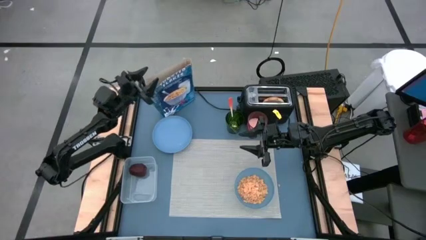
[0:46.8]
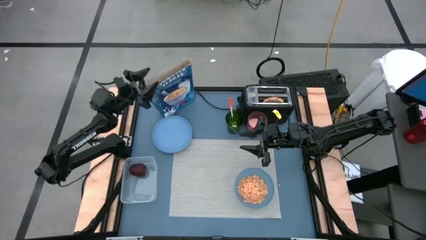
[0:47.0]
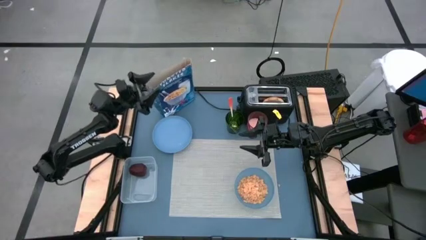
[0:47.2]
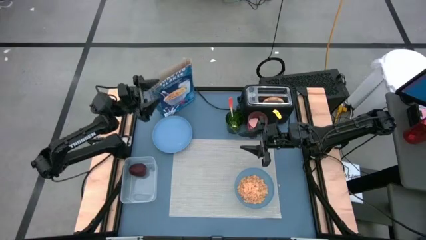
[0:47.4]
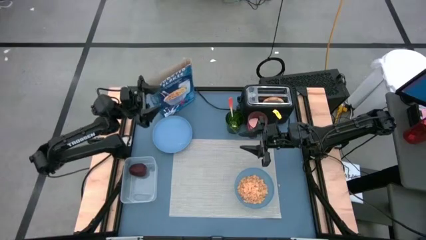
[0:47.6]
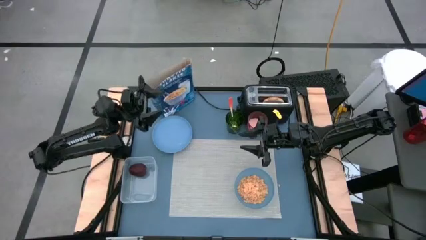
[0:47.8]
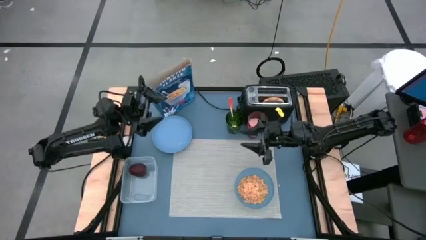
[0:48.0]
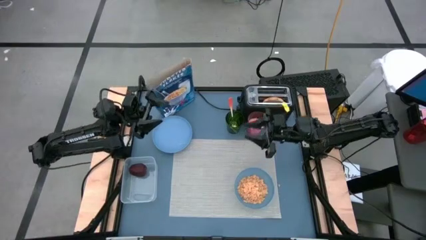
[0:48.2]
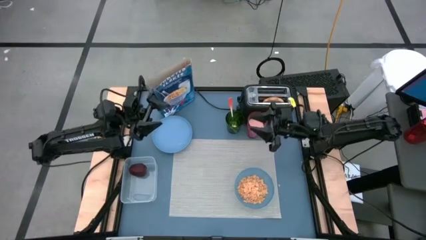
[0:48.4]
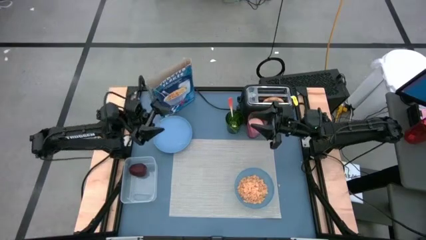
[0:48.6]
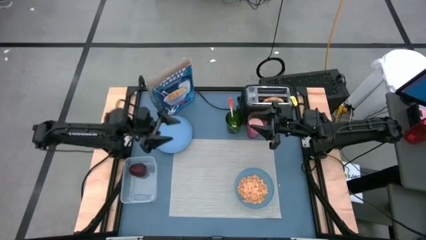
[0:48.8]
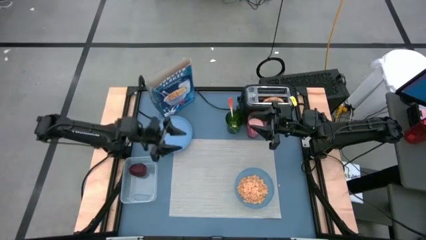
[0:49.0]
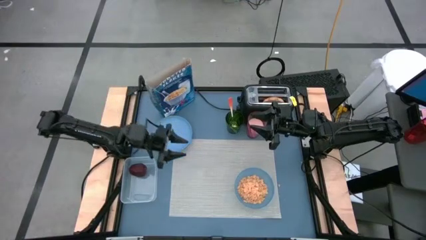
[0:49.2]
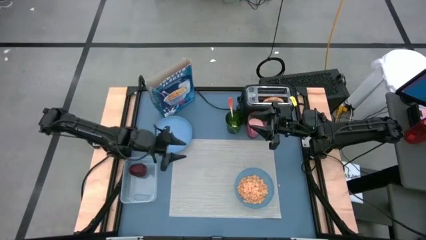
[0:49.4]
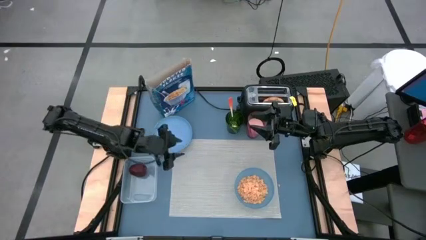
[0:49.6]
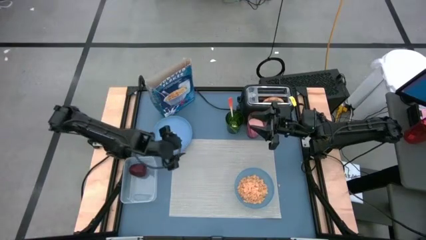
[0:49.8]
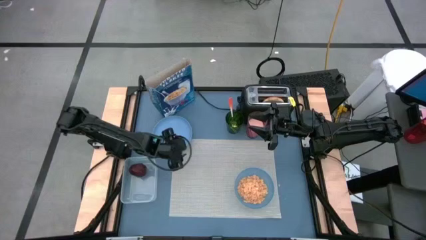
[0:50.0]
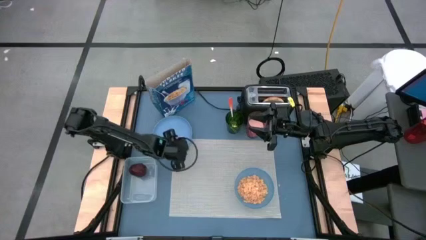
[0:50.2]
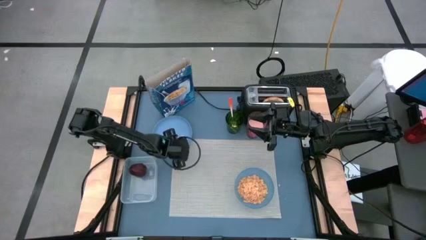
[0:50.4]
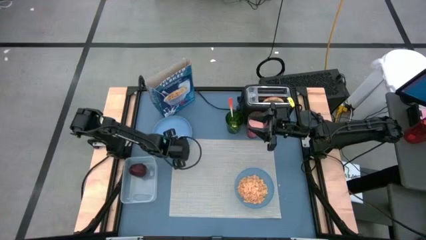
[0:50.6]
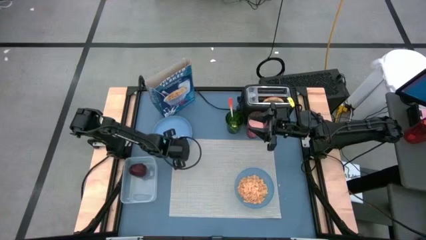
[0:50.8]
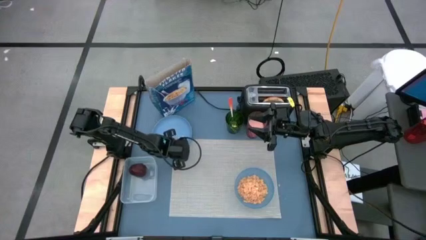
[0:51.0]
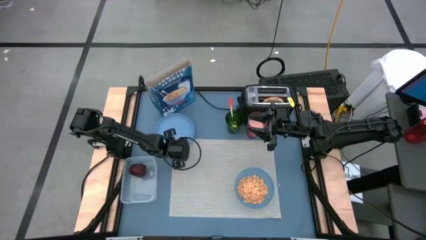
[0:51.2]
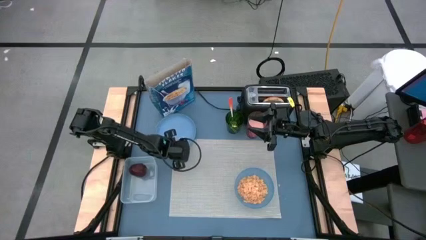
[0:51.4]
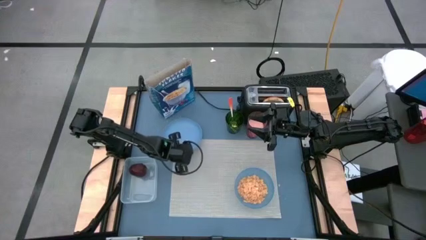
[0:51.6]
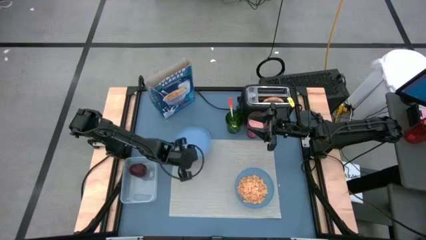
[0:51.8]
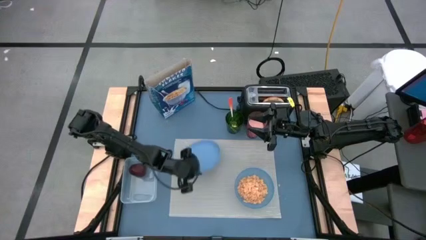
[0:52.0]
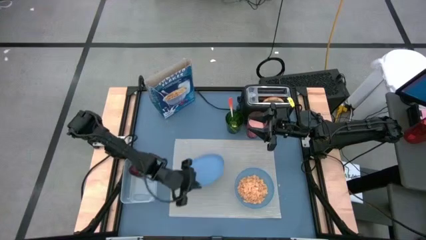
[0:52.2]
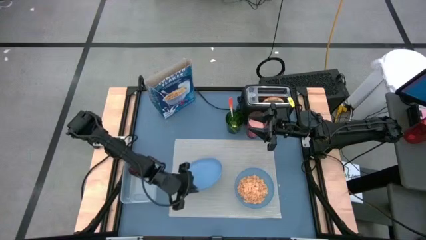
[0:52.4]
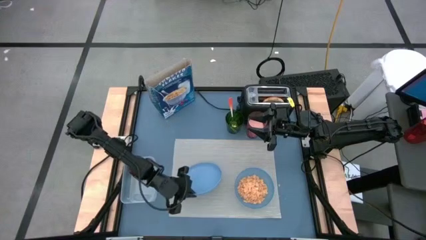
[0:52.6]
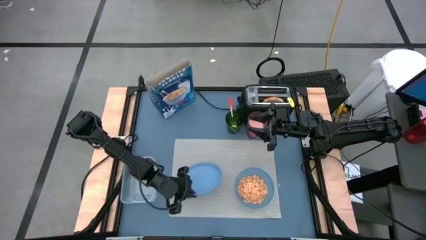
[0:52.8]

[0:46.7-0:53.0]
Task: Arrange a breakfast setting
Put the blue plate on the gray placemat

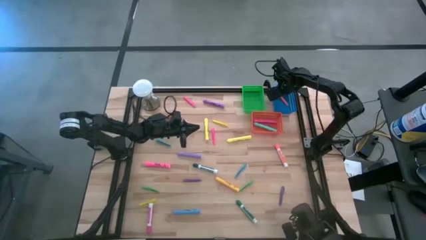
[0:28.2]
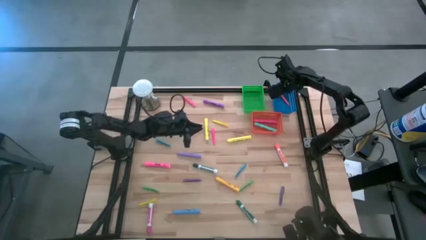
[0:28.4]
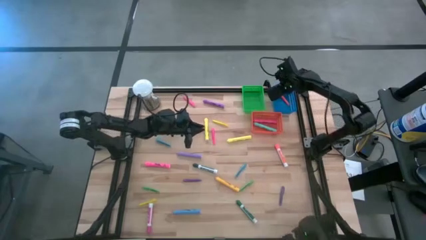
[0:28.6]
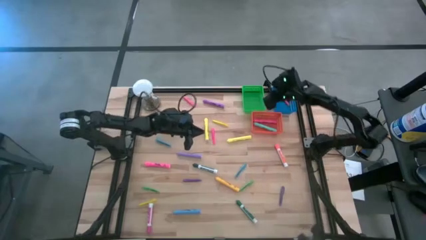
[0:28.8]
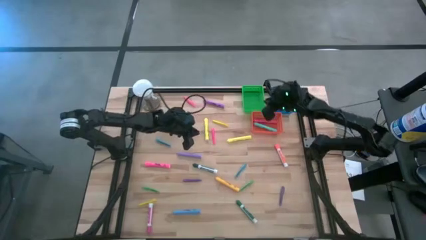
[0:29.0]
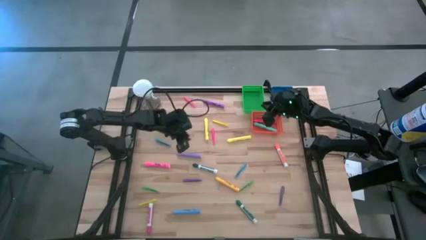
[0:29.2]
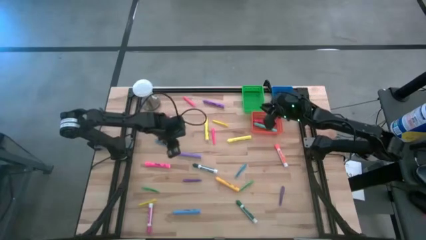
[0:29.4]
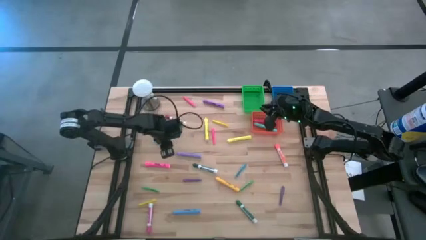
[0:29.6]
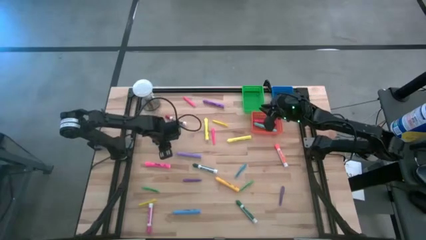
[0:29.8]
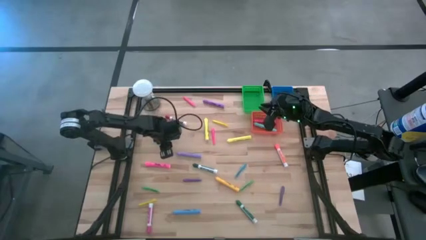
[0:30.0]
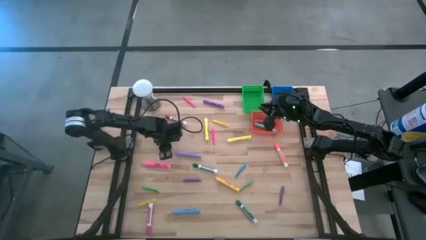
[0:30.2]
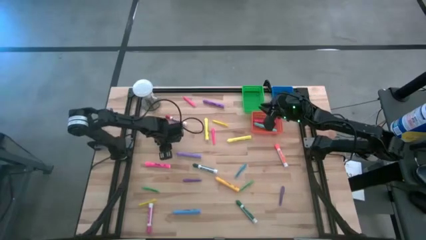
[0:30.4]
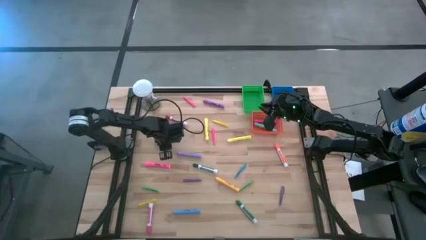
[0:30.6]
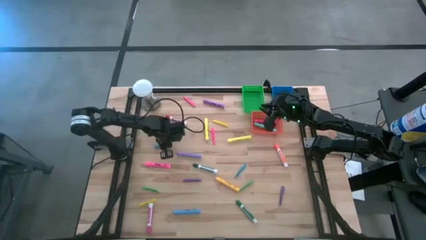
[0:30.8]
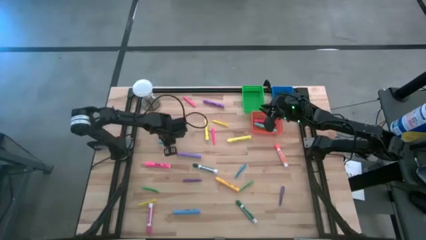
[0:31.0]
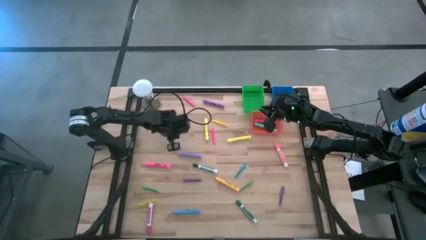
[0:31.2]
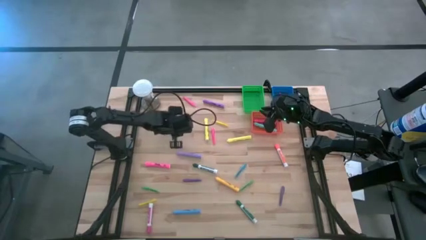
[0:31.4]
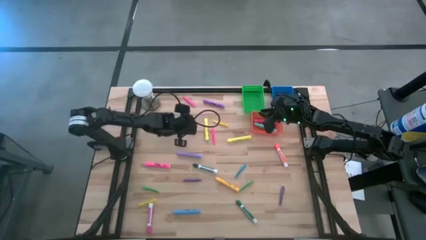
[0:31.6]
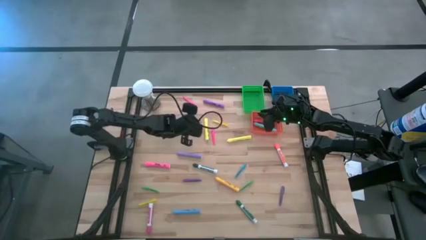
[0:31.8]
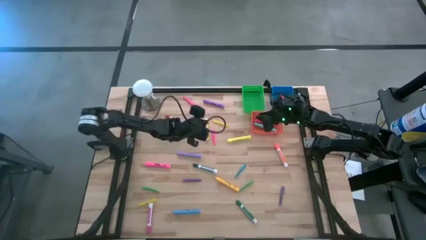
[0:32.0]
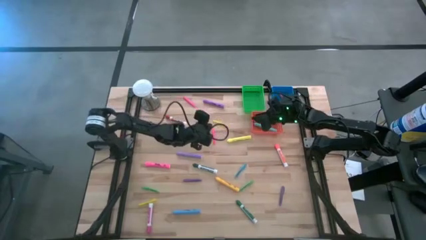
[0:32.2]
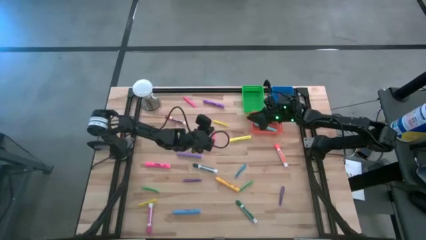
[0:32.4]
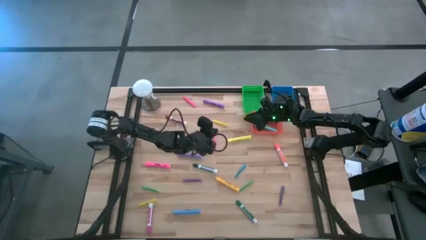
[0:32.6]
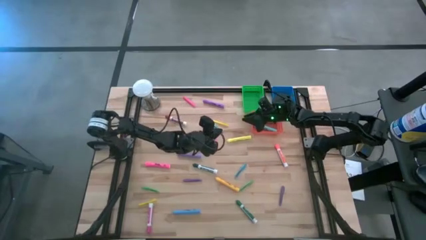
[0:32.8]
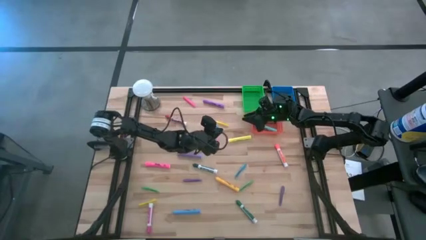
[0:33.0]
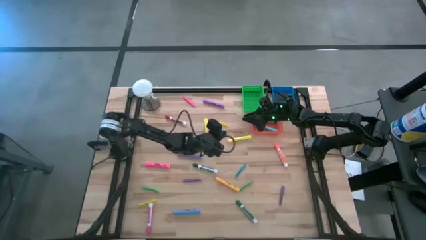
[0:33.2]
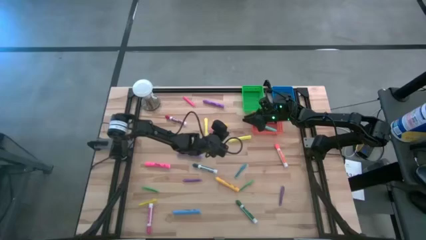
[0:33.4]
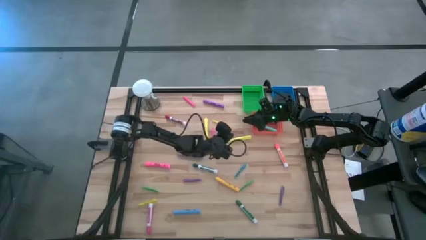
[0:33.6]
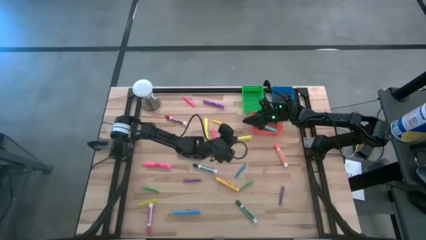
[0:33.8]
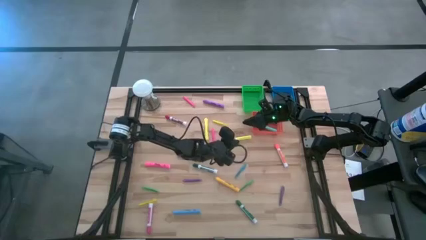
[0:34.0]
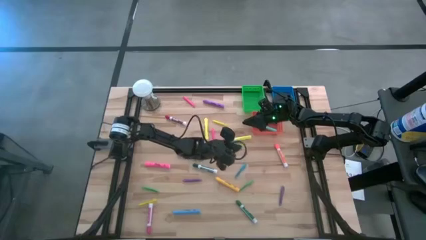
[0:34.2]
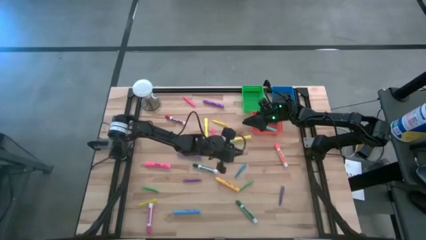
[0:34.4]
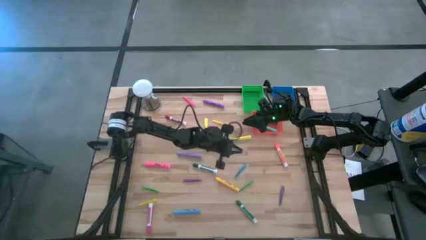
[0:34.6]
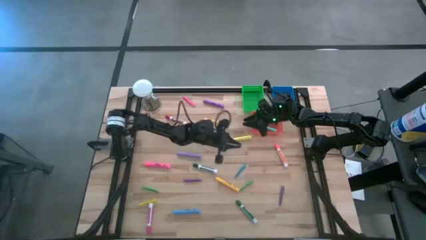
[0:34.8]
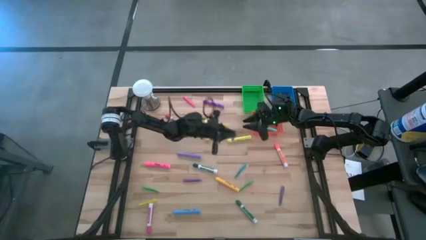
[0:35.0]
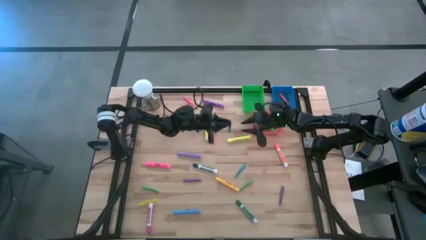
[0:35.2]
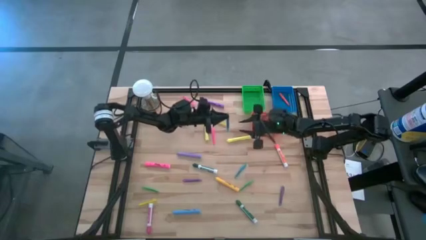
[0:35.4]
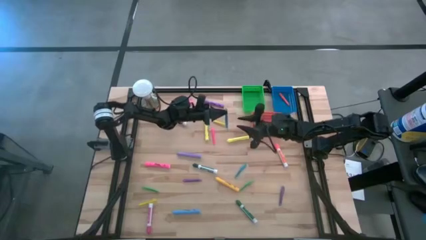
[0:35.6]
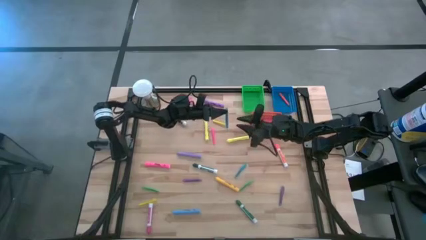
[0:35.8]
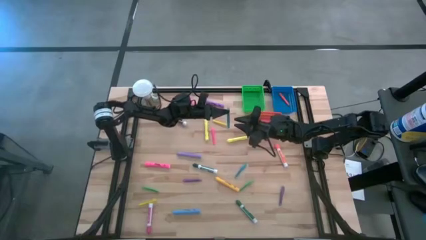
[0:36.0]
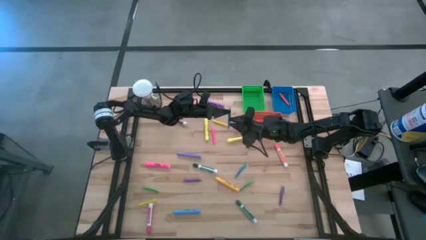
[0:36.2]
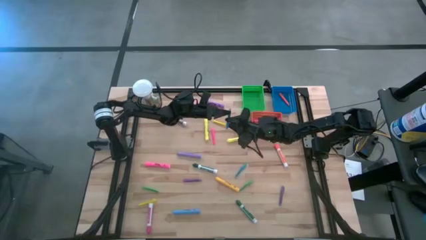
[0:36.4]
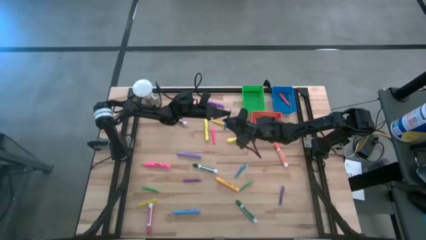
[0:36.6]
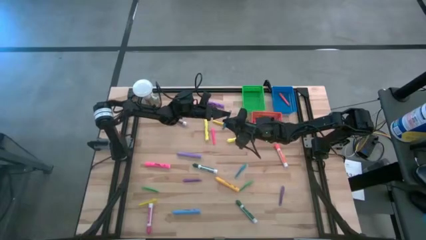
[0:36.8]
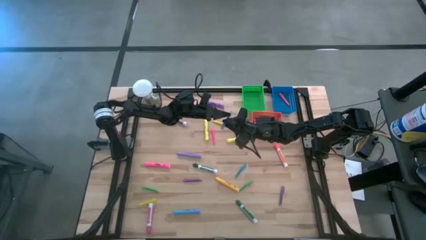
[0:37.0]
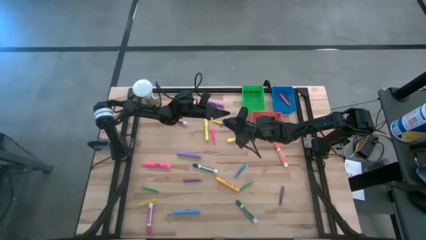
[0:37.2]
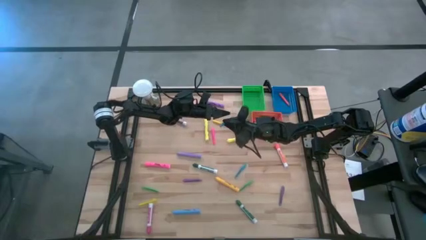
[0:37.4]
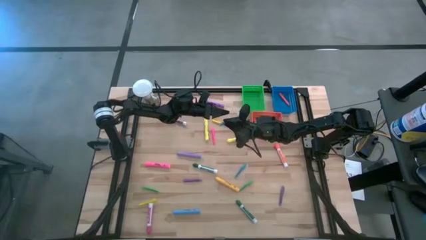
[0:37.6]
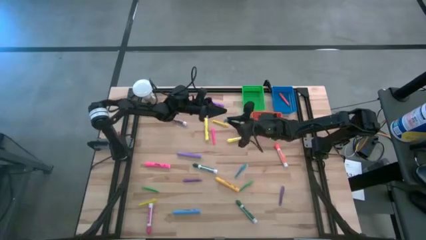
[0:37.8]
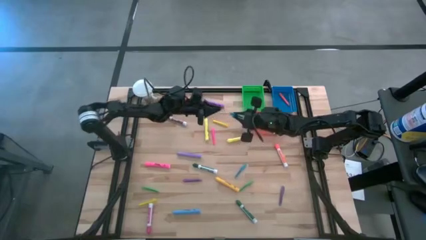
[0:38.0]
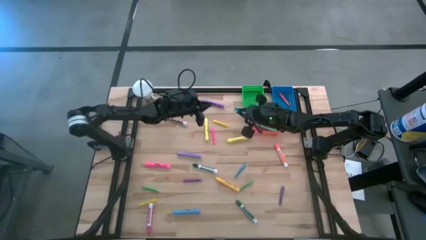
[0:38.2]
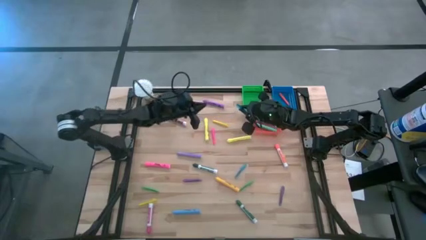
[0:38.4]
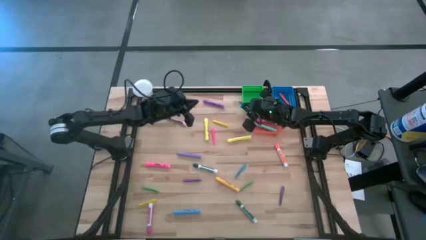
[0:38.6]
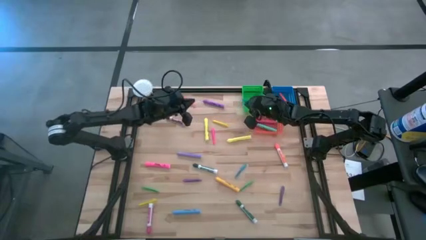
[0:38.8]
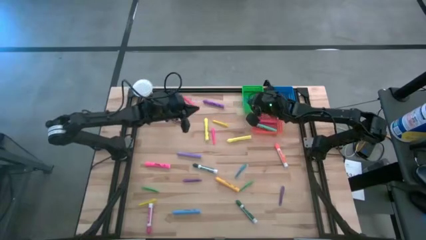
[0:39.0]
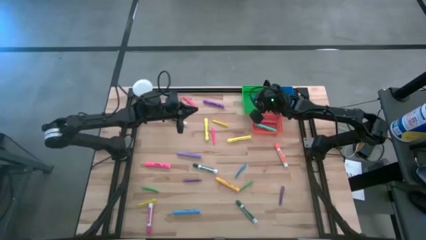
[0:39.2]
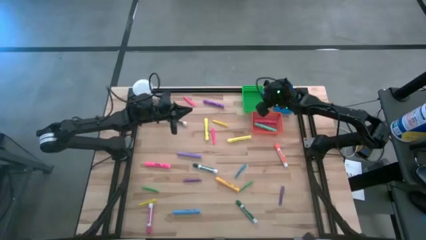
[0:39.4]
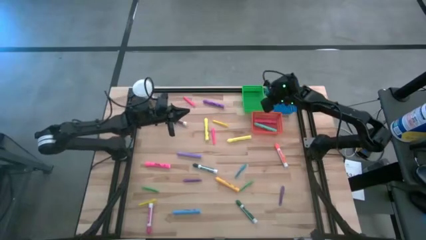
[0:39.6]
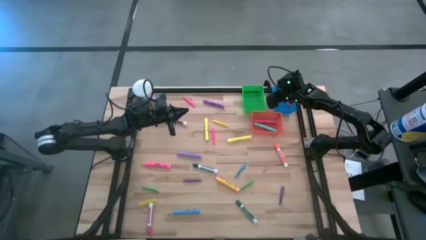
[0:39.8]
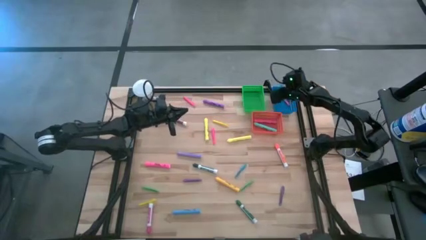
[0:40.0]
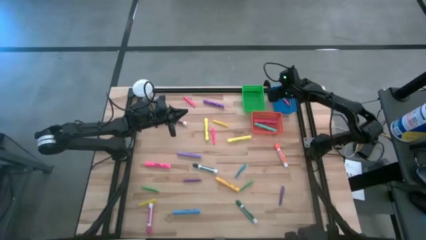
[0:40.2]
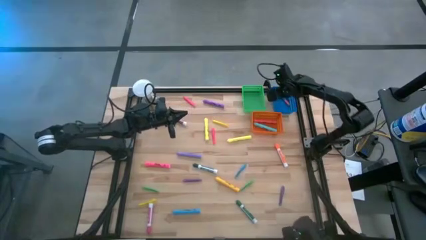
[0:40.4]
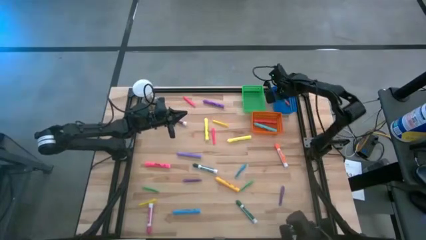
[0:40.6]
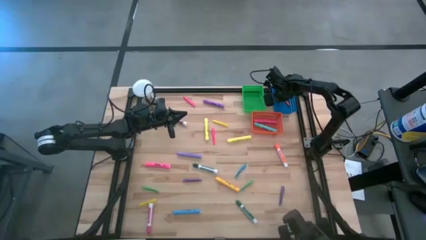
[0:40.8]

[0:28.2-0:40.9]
Task: Pick & Place Markers
Put the top blue pen into the blue bin
